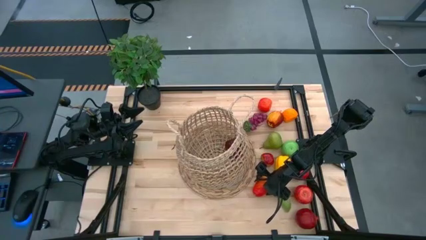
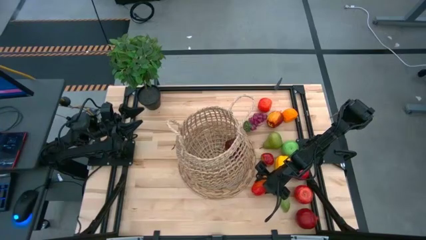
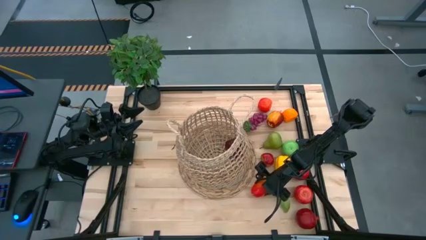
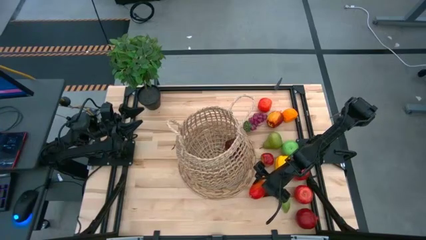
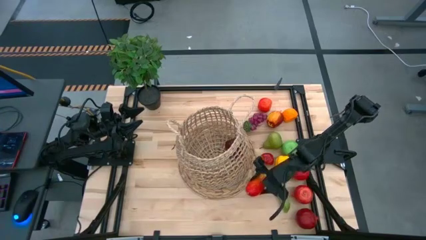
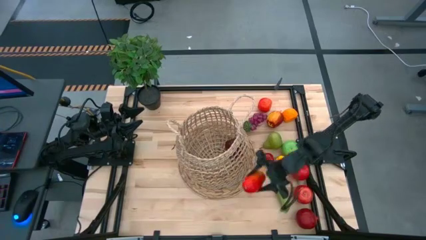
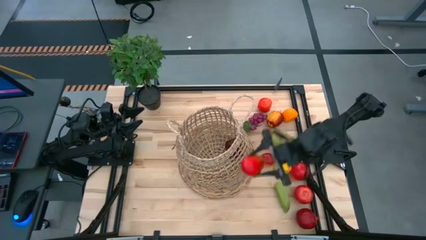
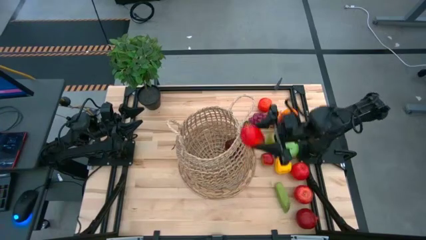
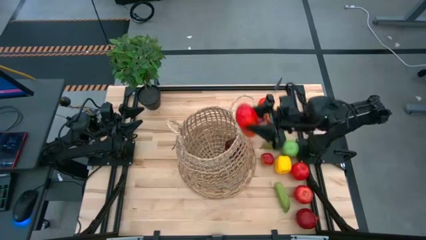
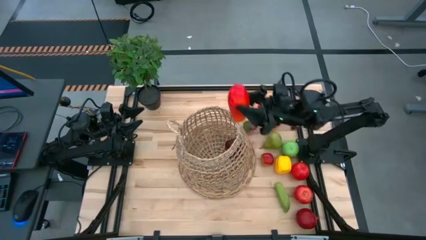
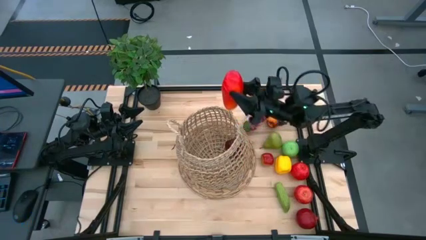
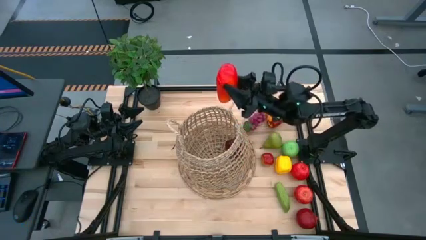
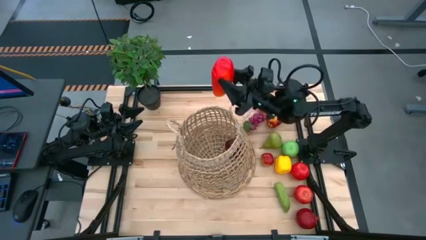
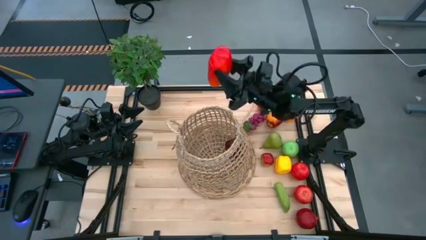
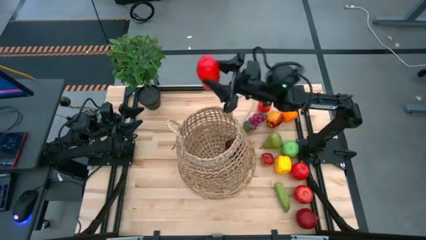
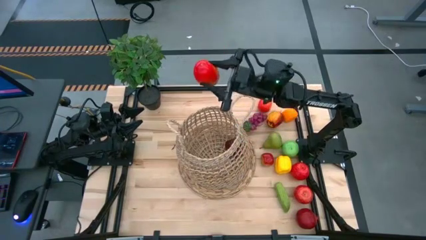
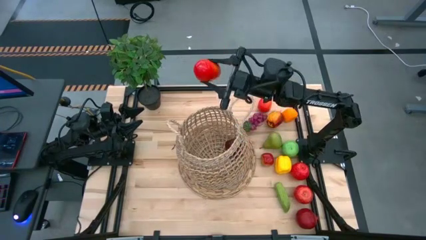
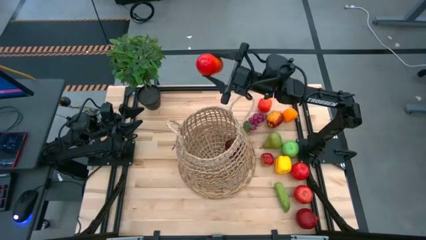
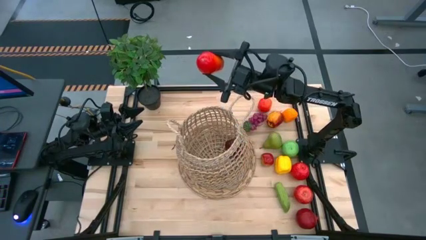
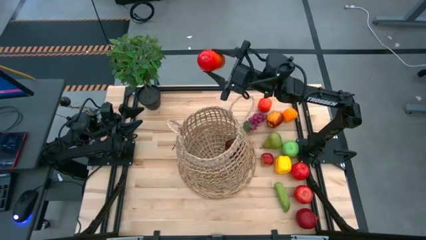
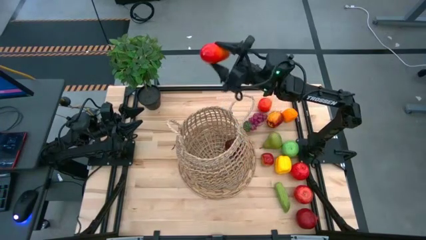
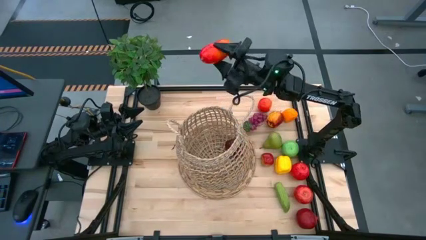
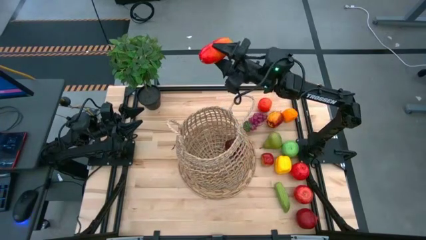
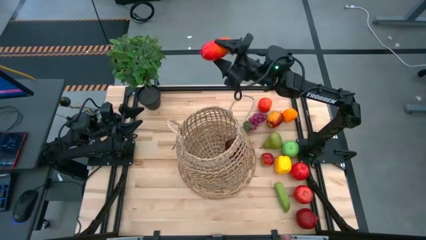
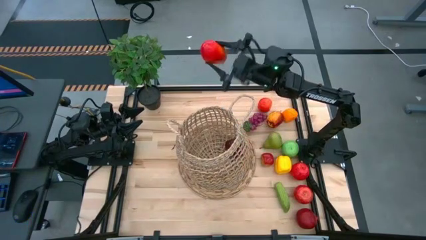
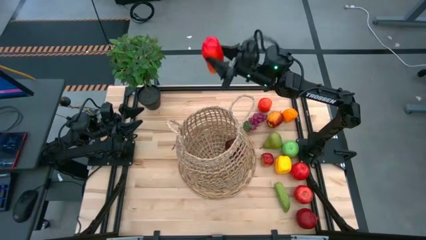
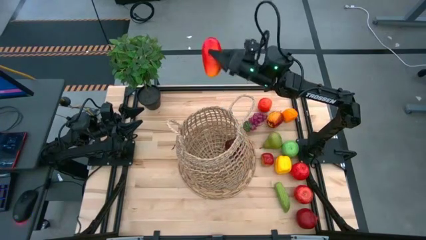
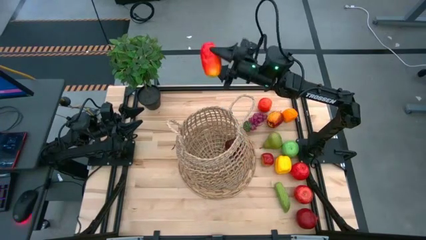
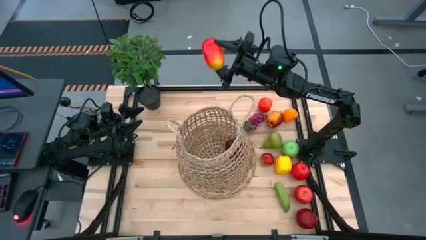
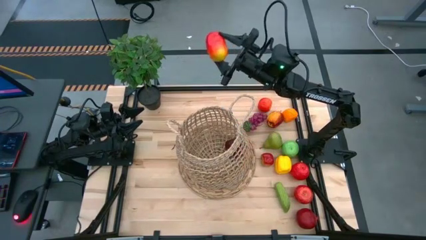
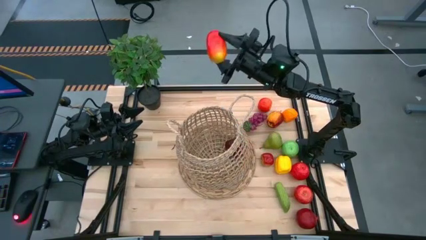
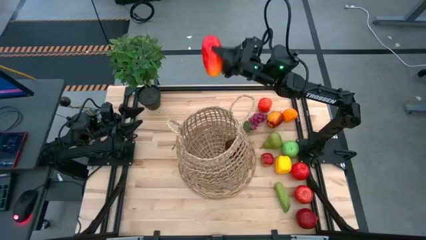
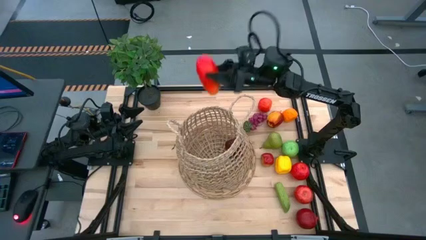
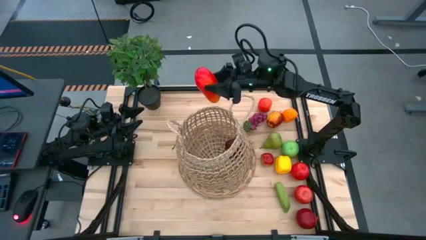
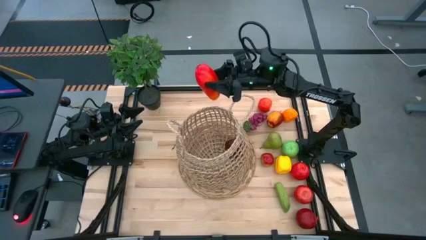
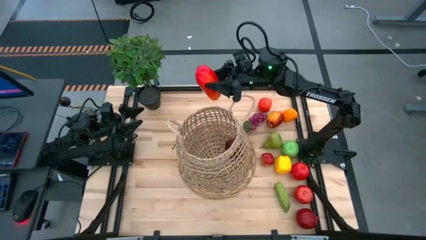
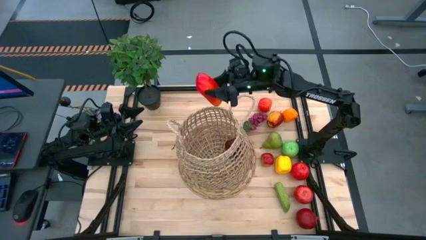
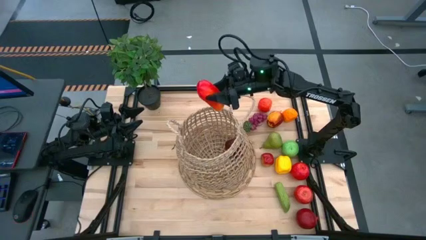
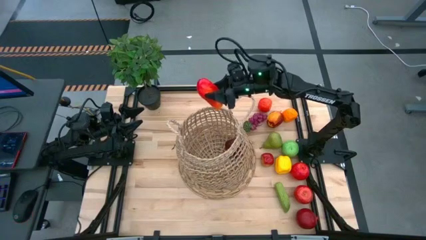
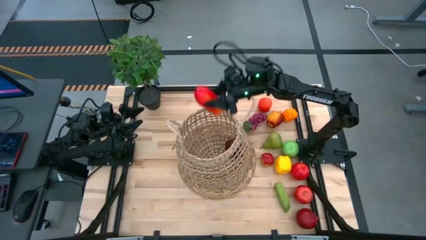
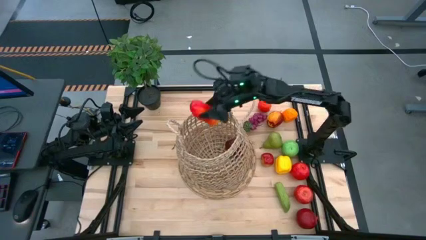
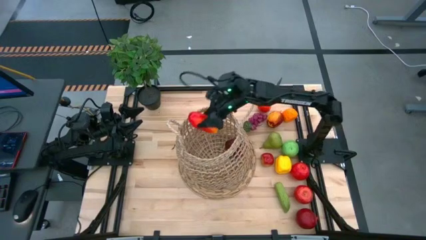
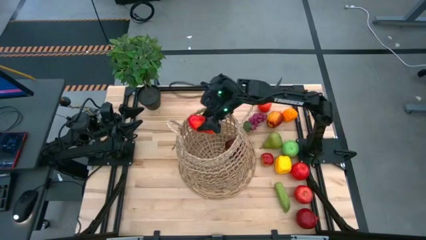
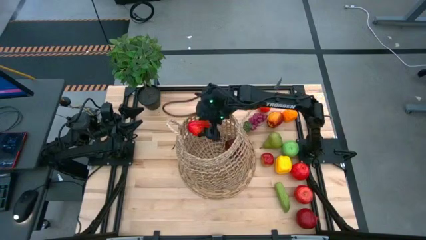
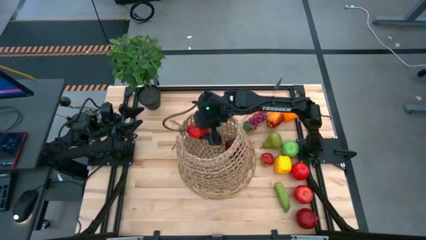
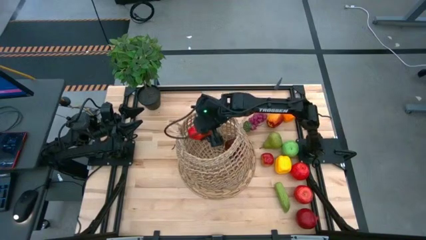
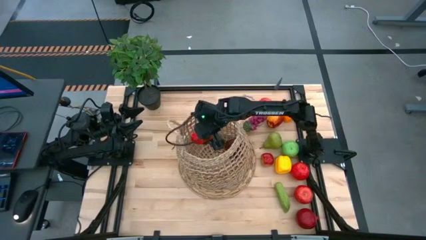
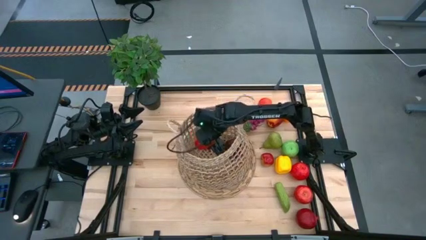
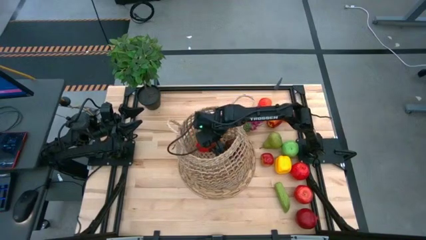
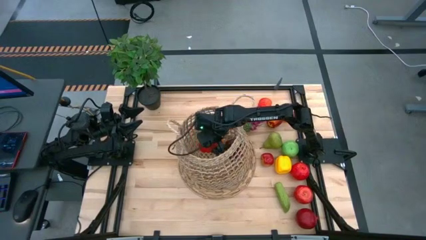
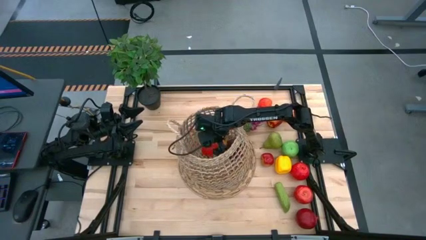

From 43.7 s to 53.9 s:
Task: Build produce basket
Put the yellow mango into the brown basket

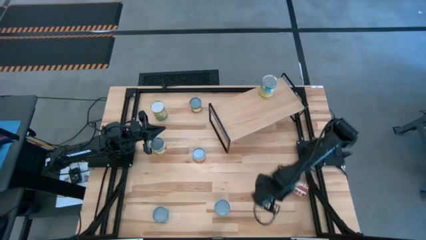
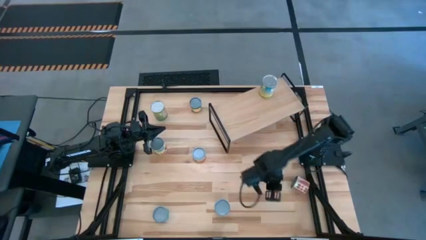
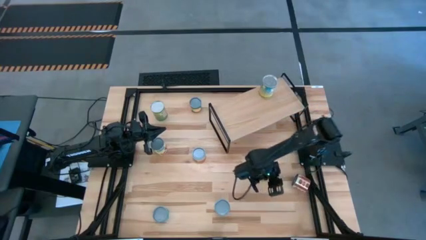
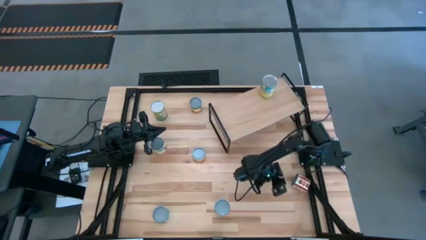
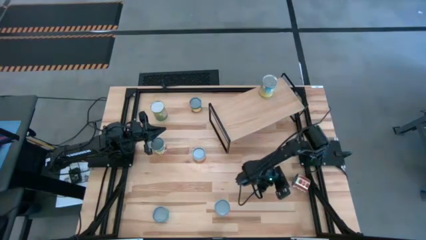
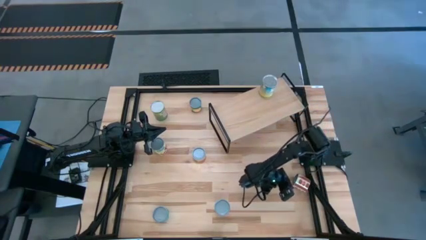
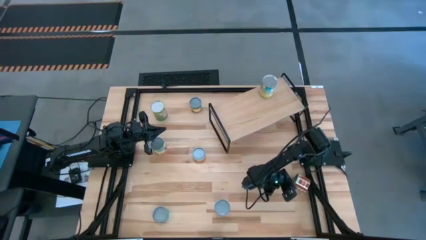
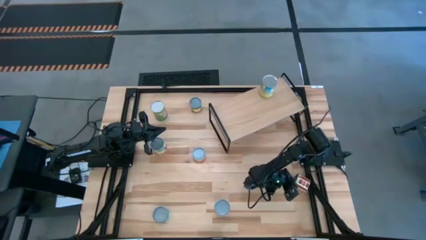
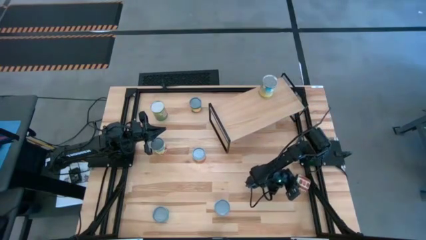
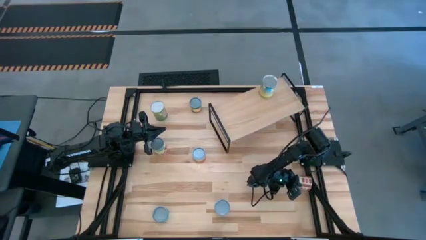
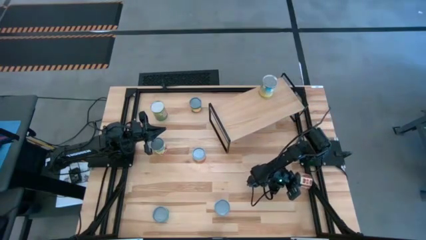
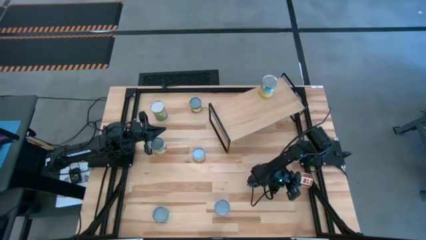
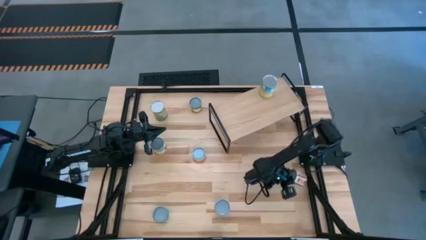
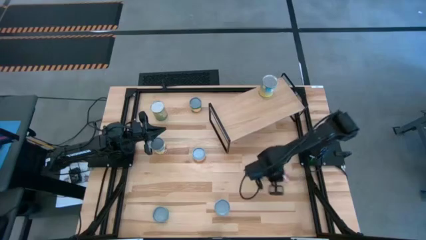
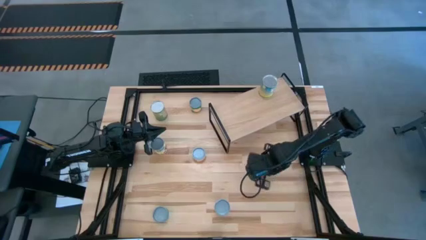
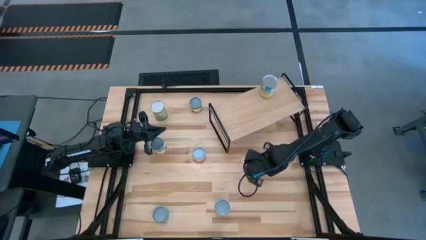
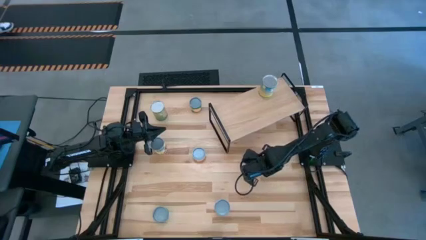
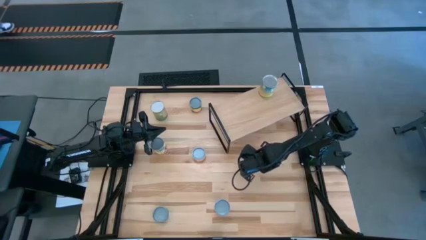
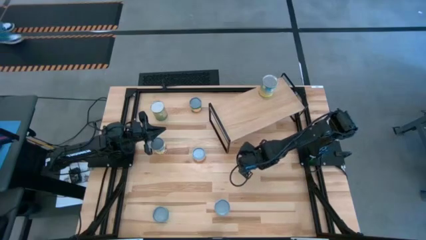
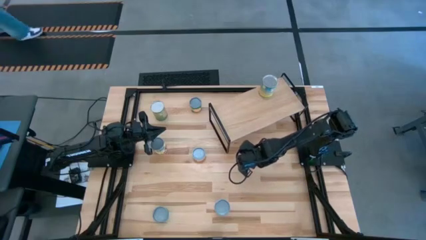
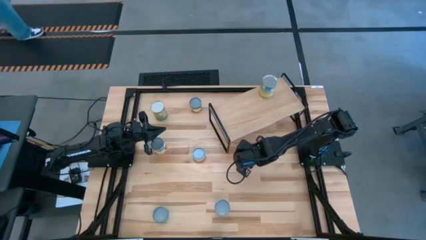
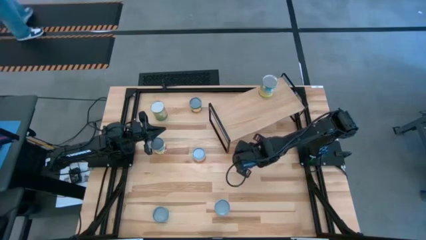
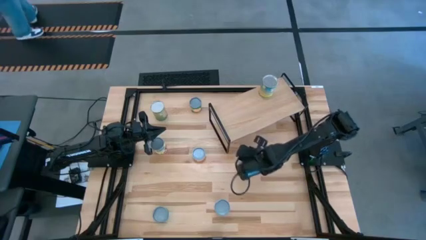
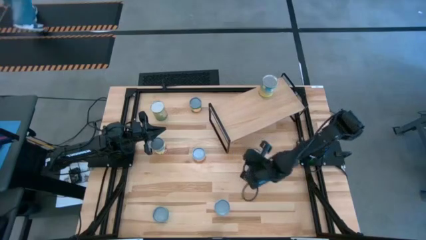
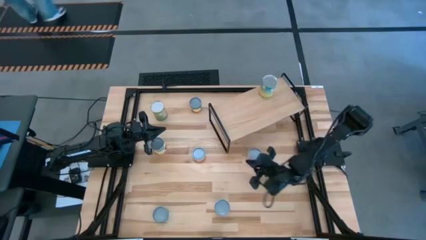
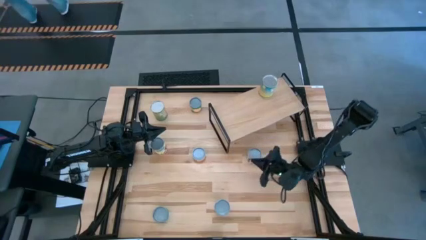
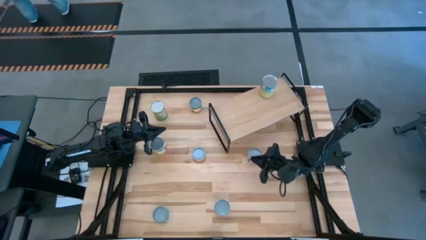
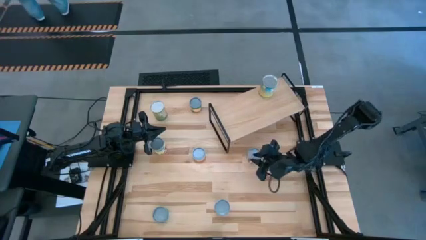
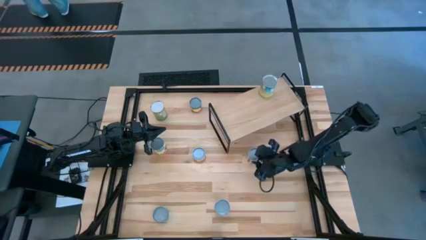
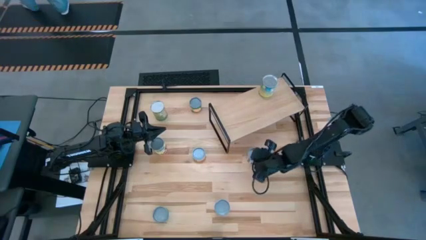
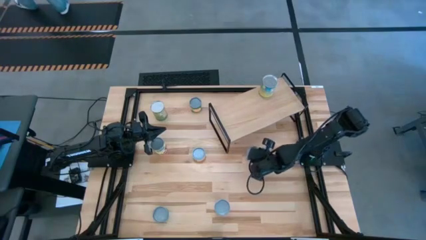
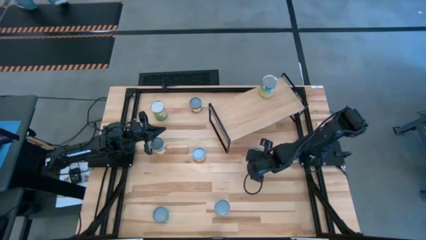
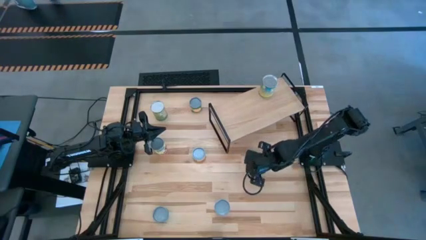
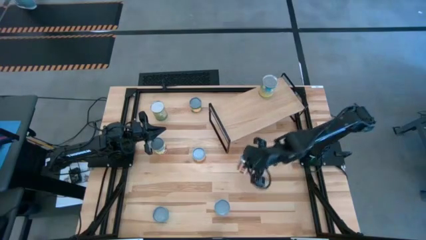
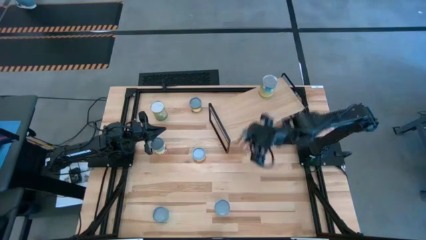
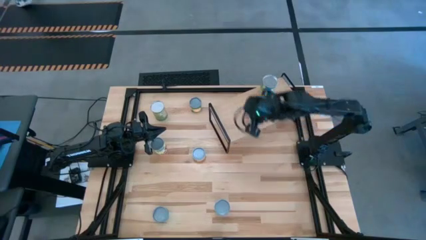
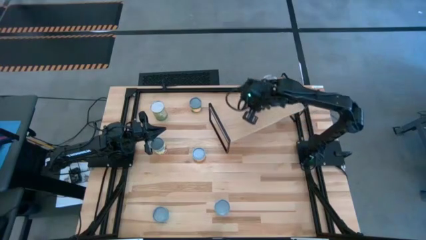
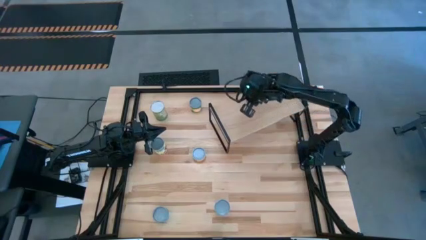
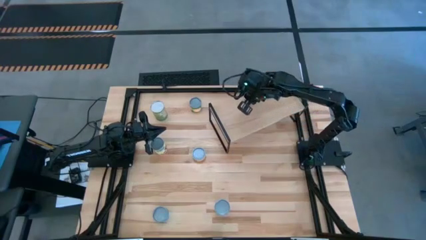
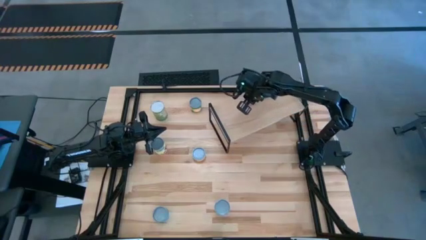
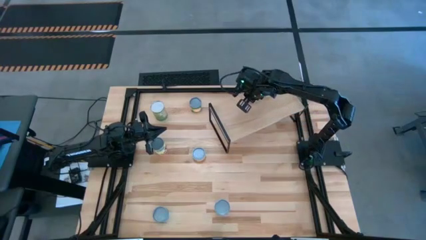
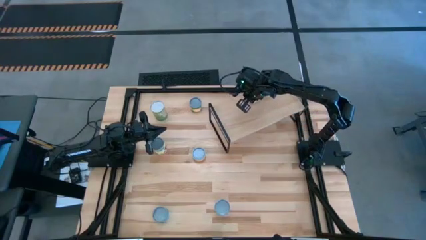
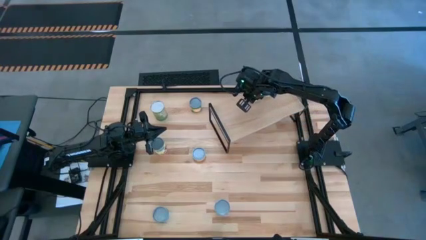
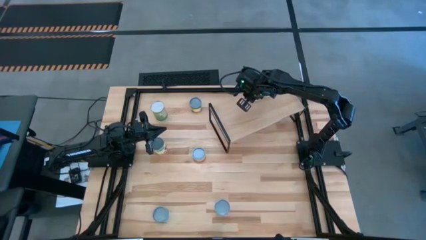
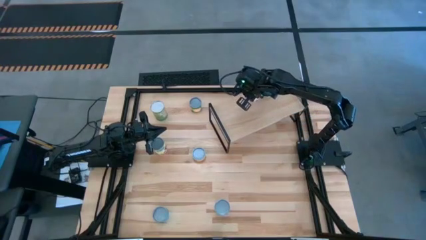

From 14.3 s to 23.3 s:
Task: Pick and place cans onto a shelf
Put the canned diced tomatoes on the shelf
